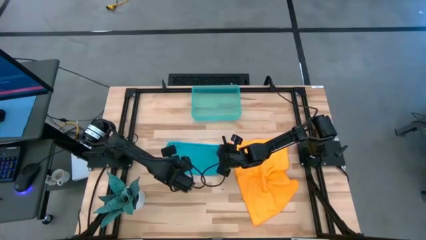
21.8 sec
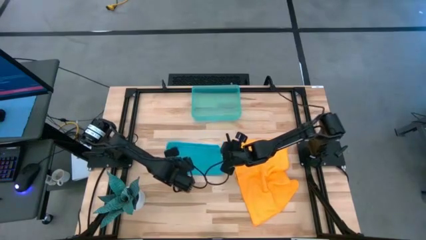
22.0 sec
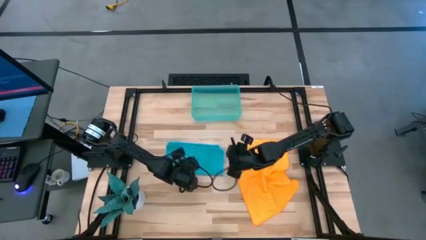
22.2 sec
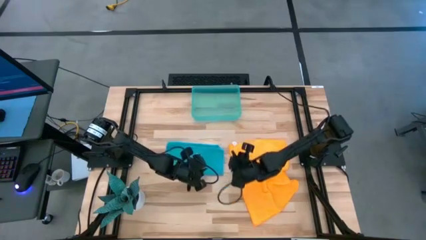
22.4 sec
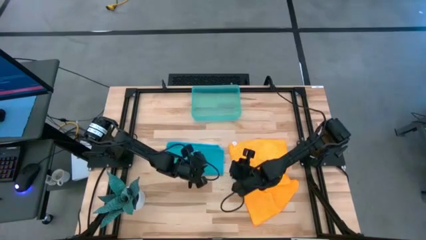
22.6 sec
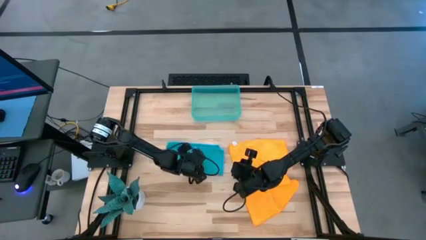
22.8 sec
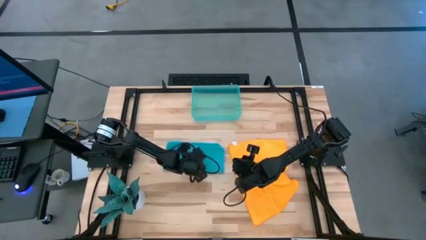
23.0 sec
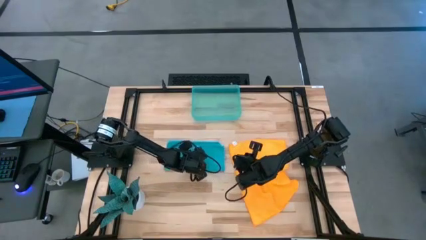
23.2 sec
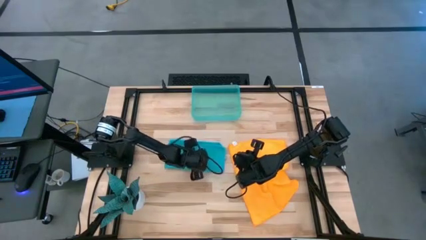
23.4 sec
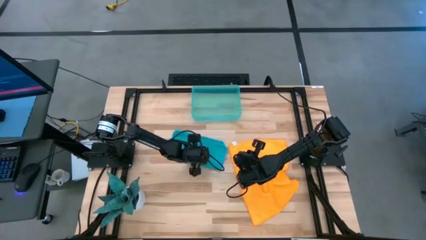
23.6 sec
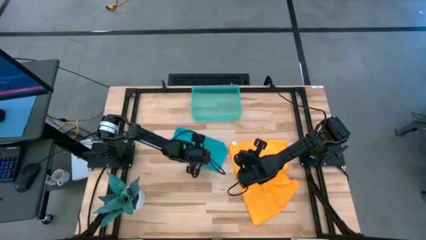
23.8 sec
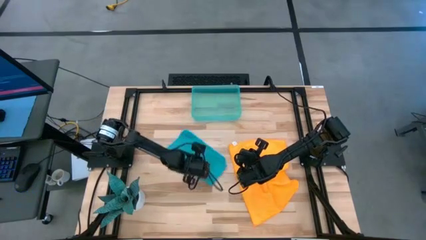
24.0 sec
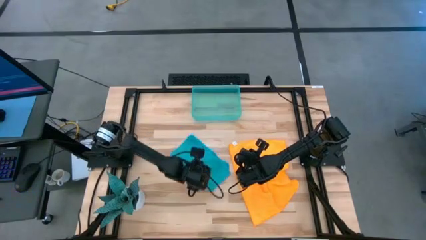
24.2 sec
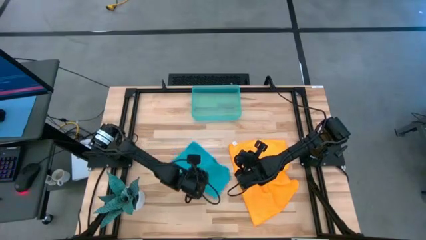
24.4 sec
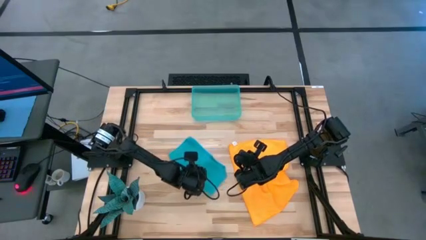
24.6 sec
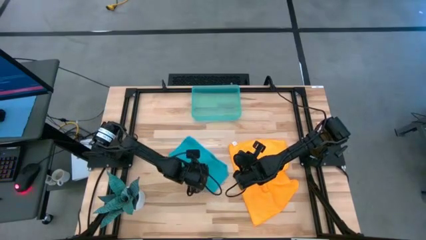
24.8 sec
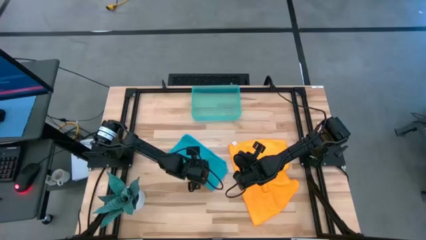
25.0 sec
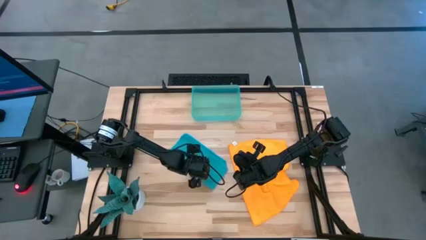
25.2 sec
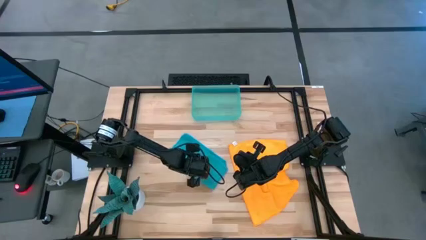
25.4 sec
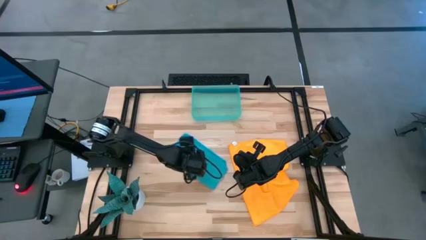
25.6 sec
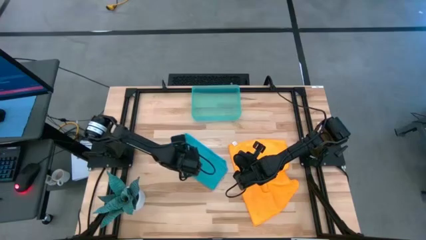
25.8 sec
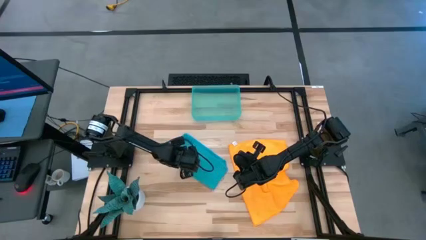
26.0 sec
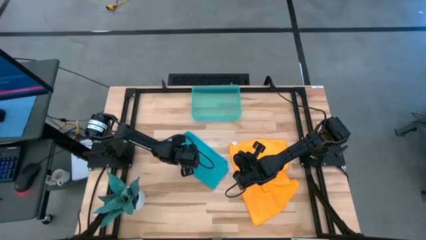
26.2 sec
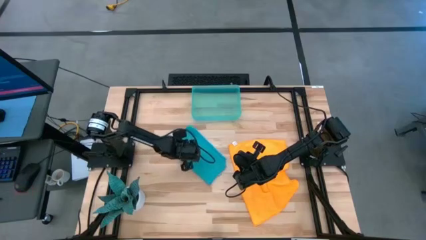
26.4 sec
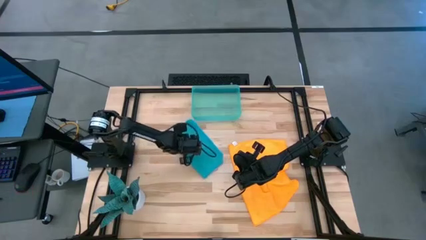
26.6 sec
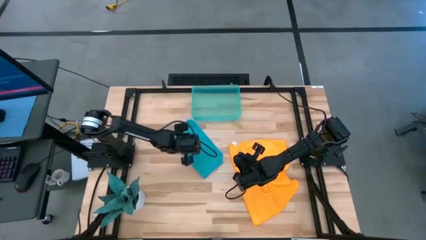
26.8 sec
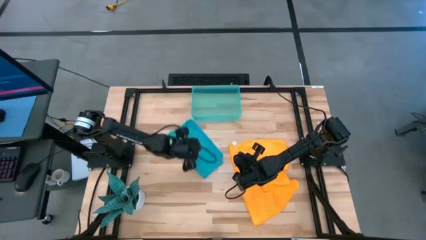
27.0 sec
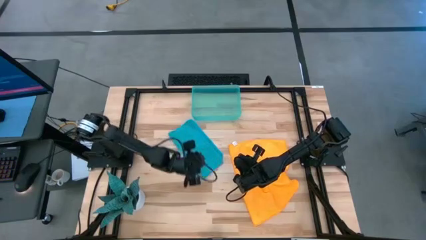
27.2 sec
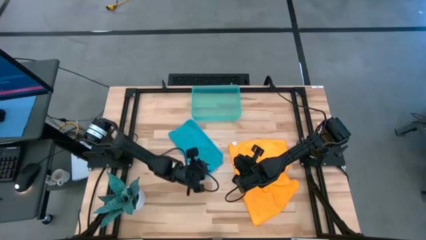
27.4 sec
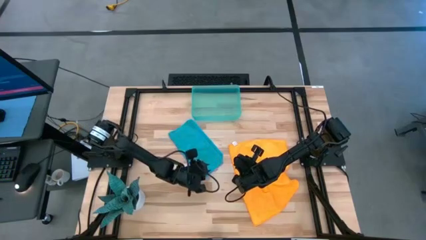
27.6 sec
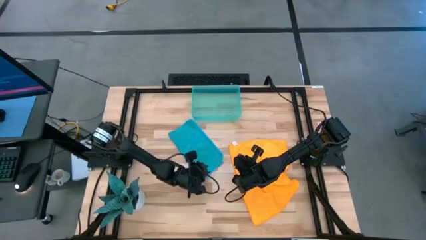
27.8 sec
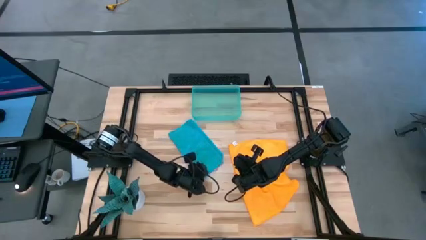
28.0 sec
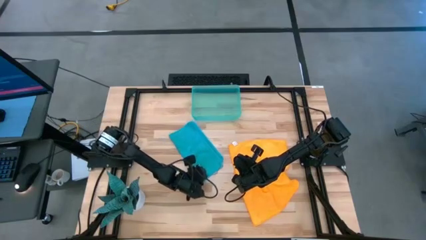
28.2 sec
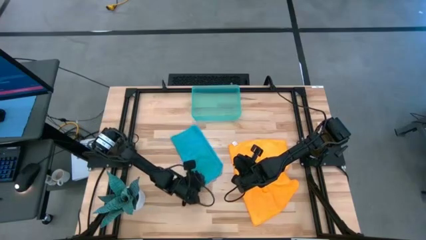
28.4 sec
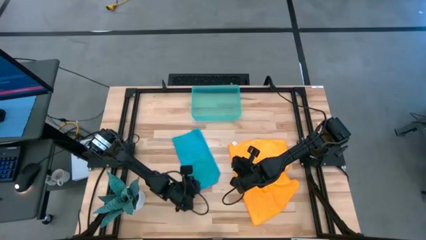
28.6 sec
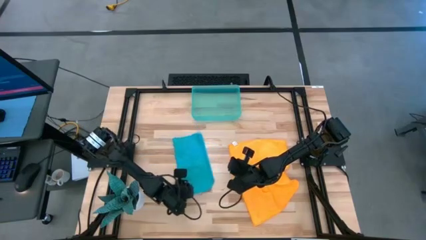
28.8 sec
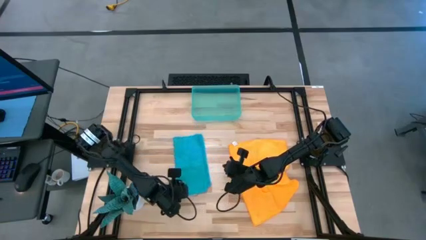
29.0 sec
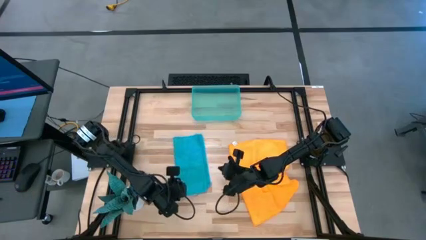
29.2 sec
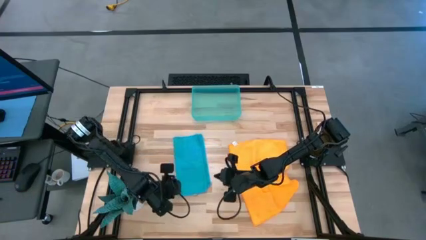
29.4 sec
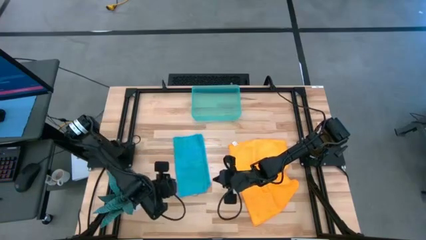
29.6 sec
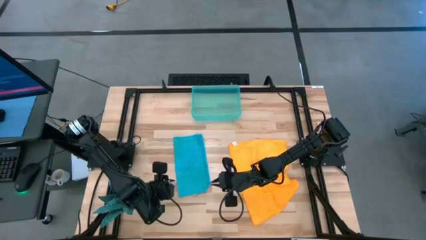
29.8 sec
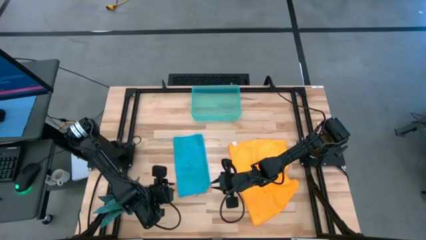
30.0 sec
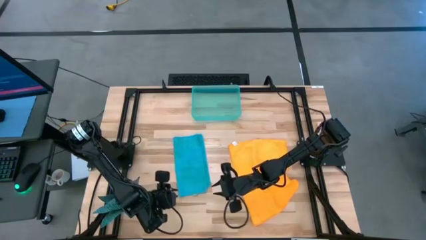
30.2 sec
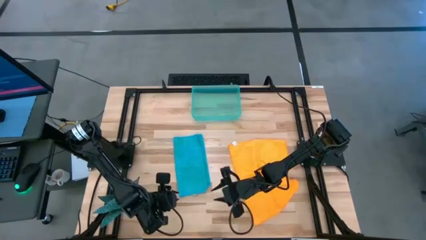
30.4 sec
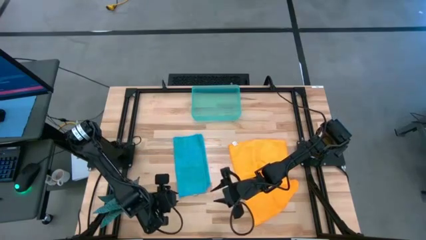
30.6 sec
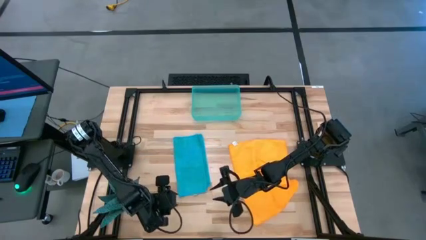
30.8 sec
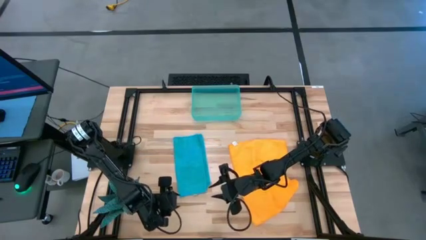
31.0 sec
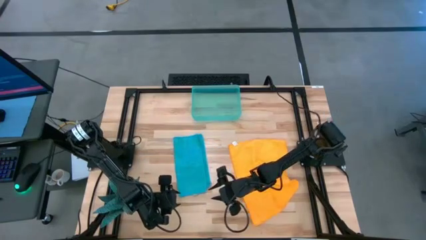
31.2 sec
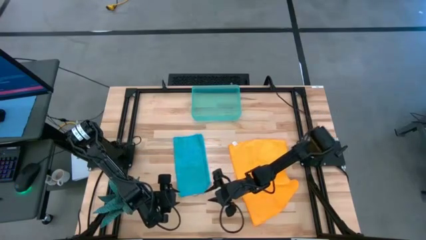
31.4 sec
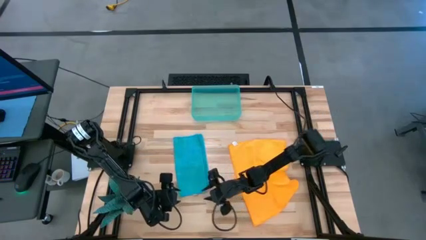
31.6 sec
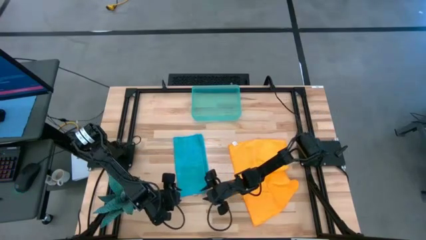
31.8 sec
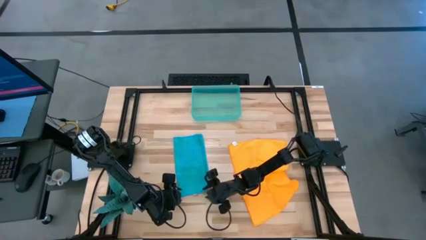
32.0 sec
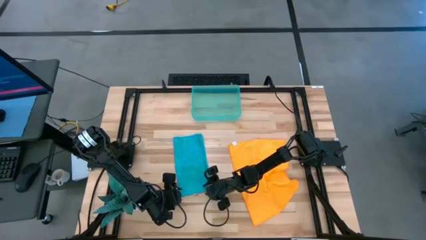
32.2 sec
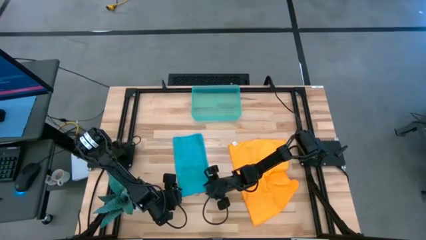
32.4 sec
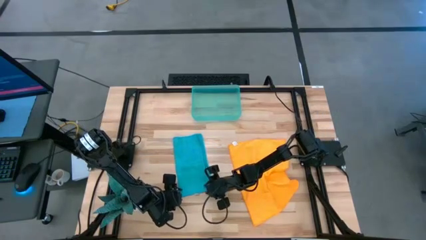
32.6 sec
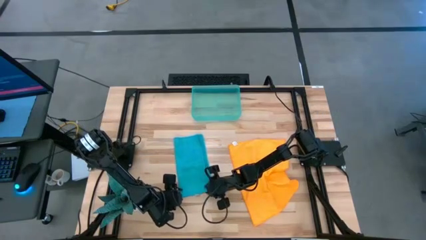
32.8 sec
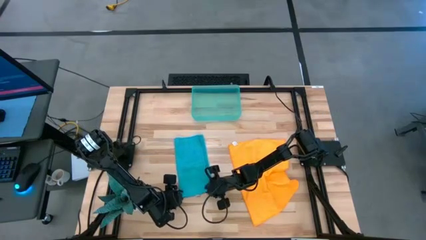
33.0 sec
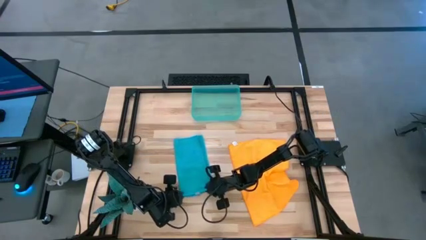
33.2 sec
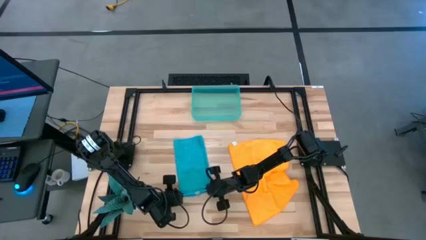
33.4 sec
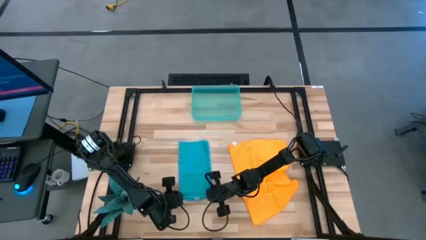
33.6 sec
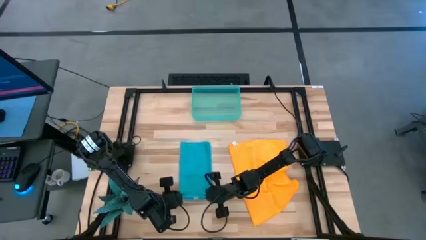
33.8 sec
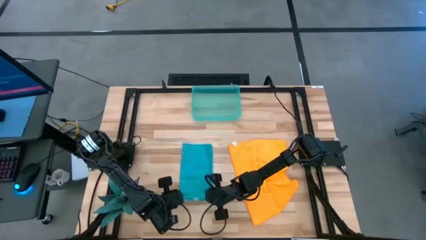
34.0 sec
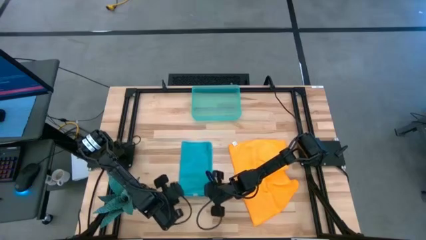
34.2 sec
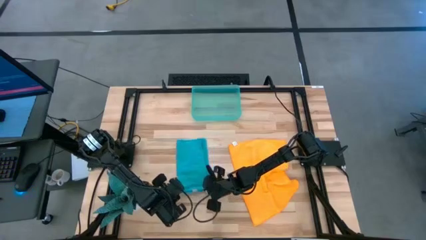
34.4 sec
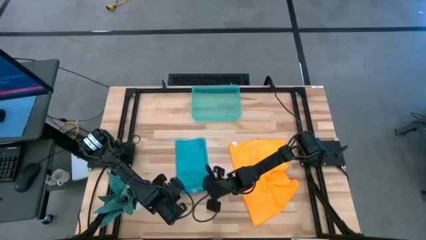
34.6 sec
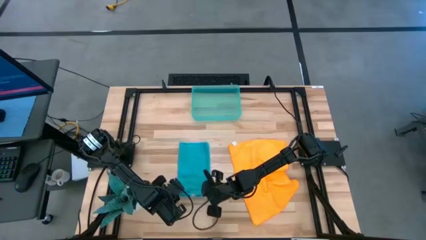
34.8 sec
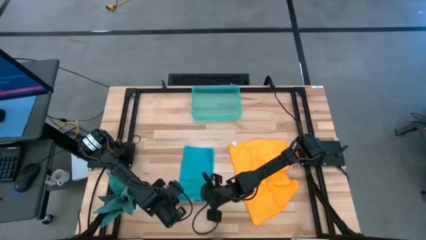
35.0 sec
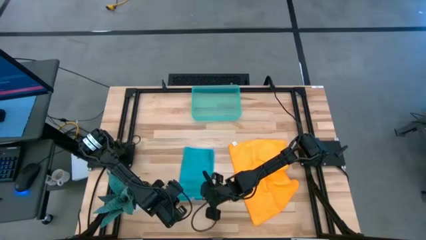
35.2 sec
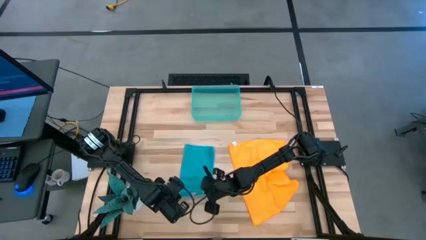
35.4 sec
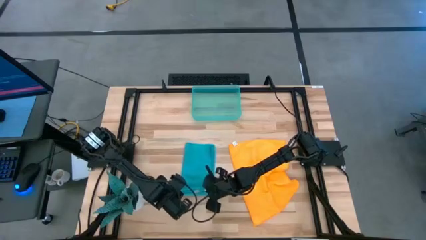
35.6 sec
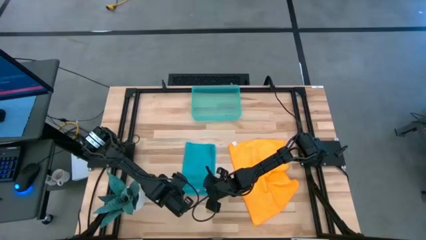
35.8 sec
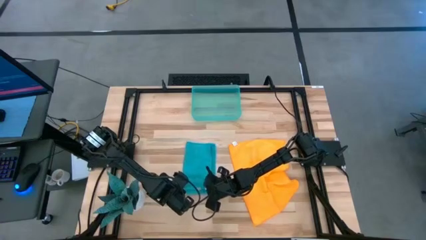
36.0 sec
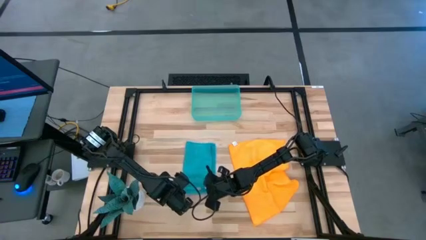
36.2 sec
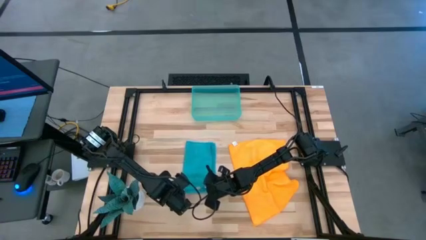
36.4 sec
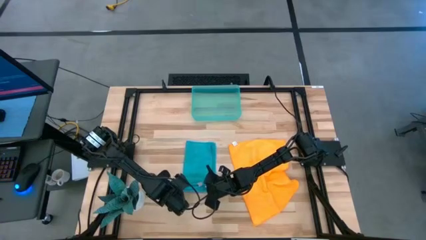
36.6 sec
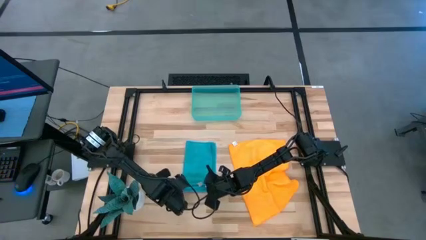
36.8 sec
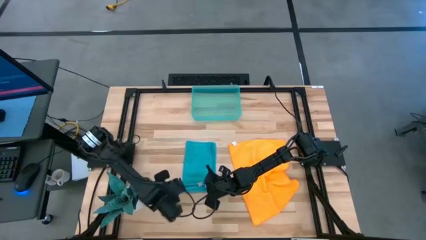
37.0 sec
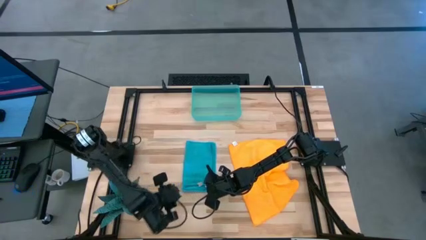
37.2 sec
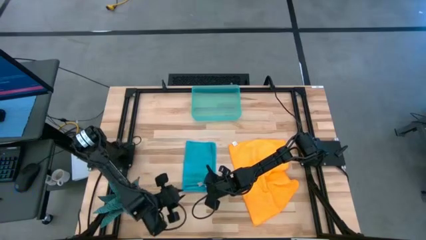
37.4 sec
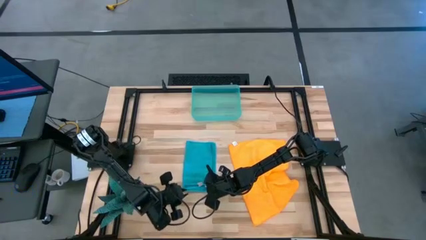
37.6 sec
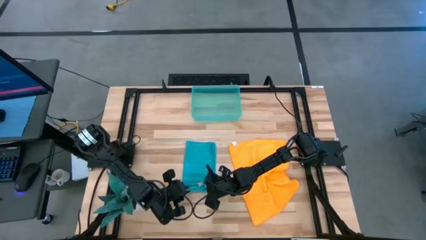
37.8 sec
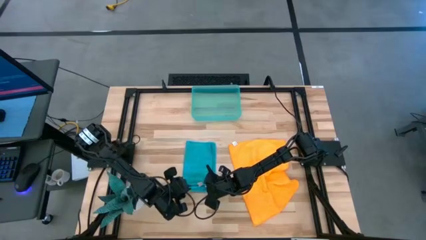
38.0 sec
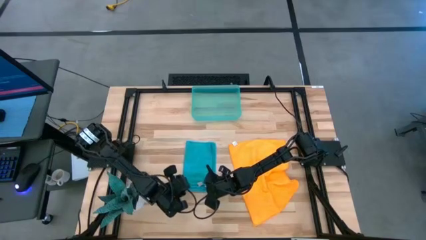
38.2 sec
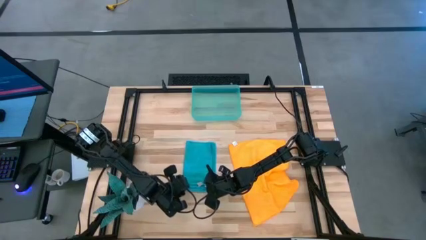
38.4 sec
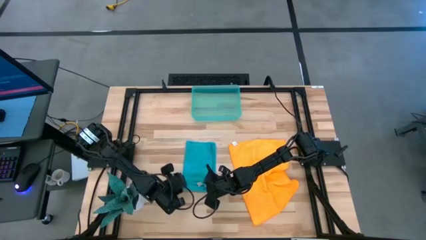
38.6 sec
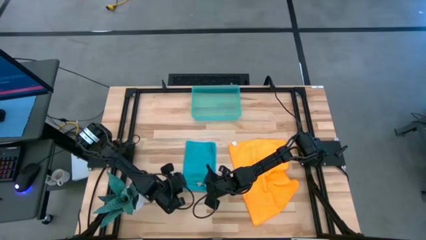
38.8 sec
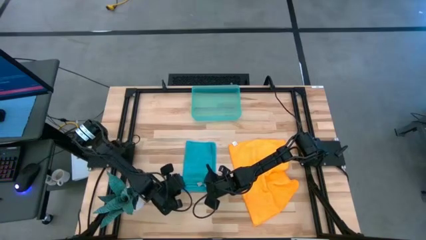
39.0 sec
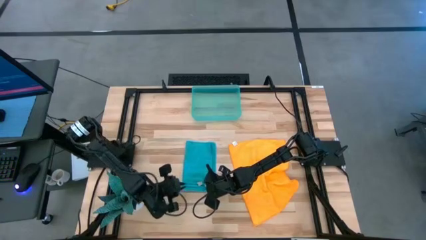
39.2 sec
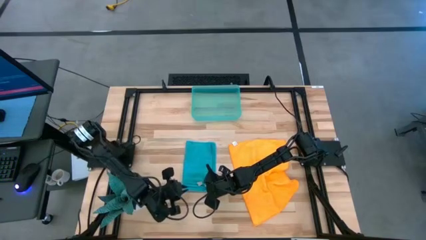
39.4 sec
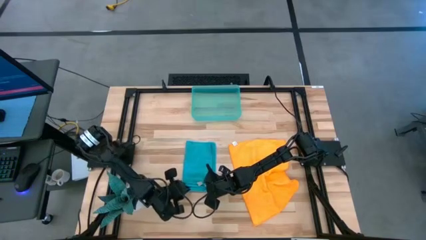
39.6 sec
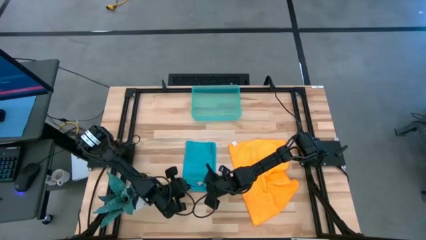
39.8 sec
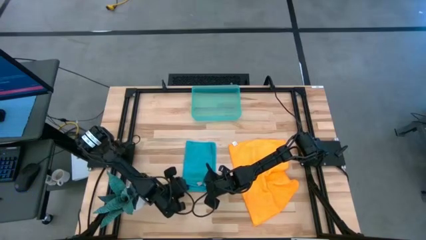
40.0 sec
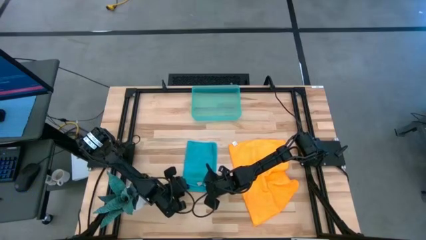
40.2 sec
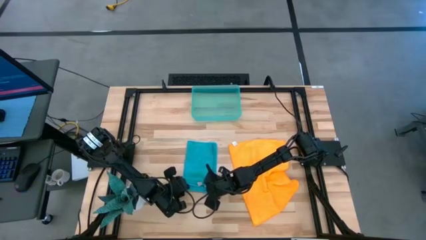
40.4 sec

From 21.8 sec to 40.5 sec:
Task: Roll microfiber towels into tight, uniform cylinder then place into a basket
Roll the blue microfiber cloth
